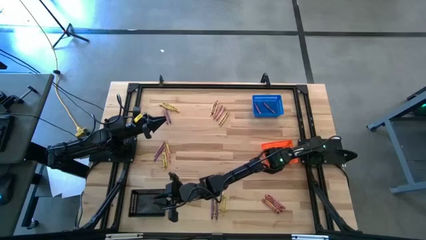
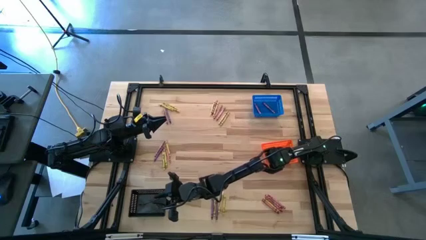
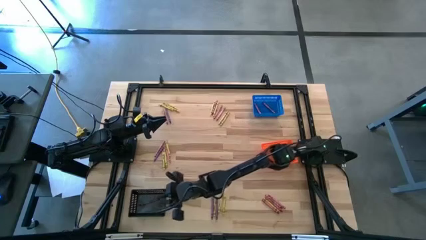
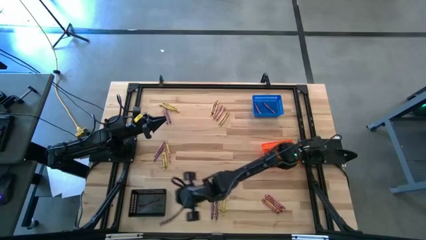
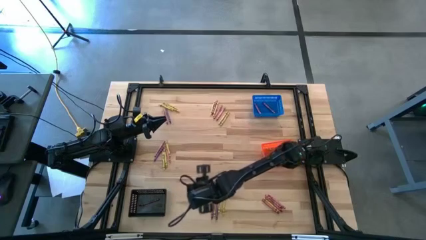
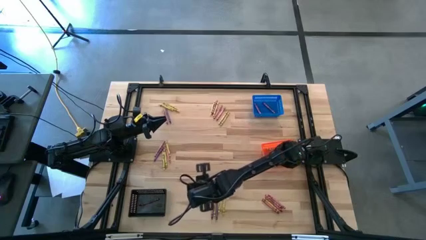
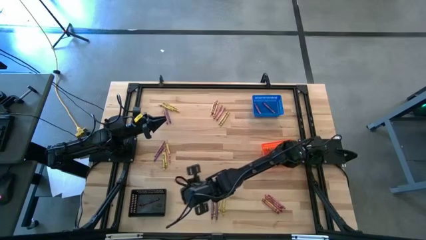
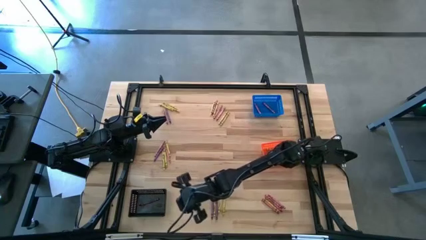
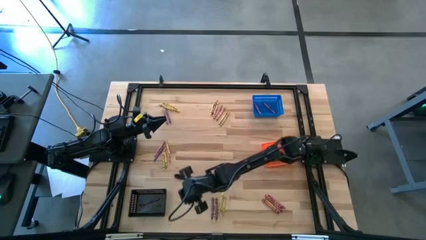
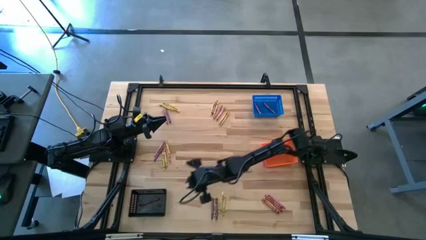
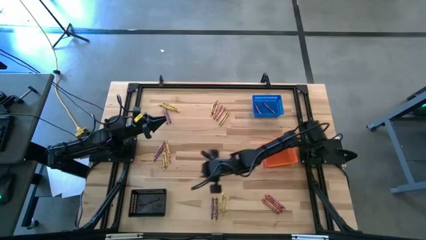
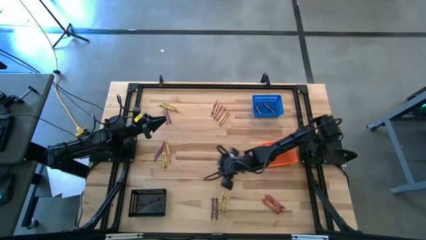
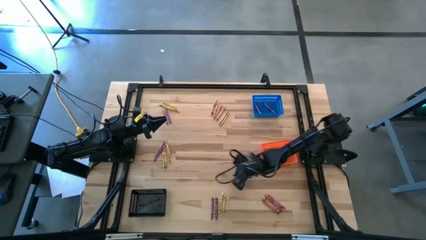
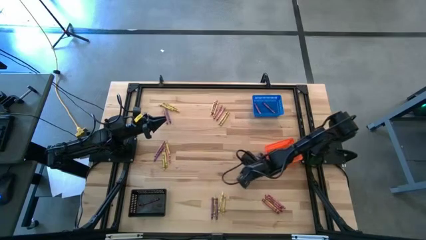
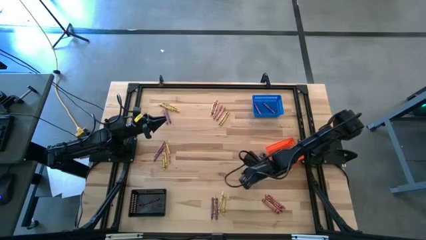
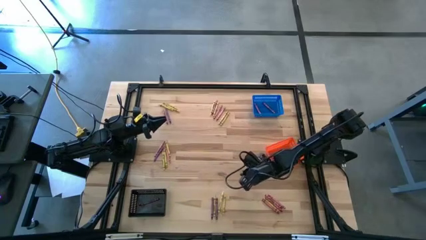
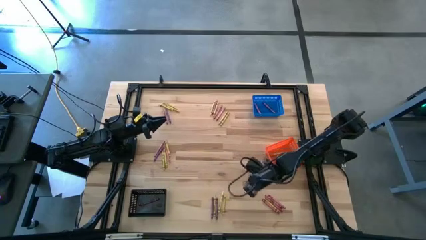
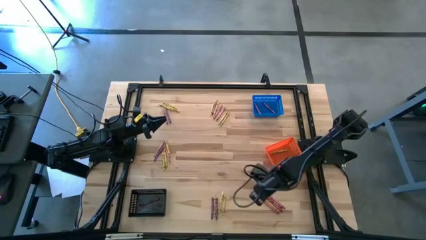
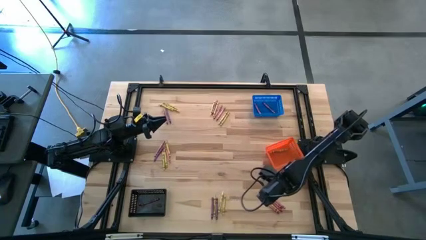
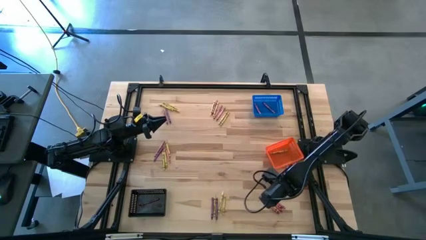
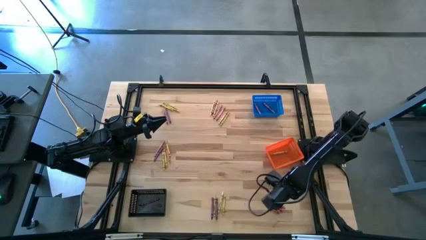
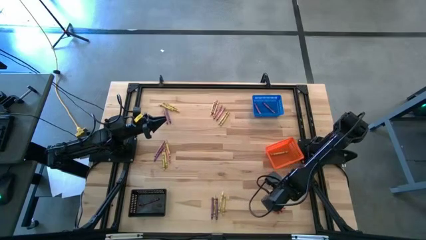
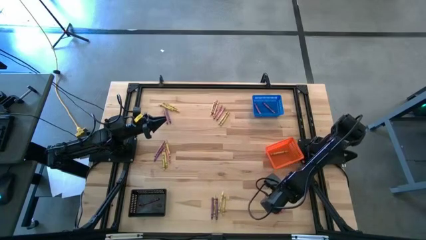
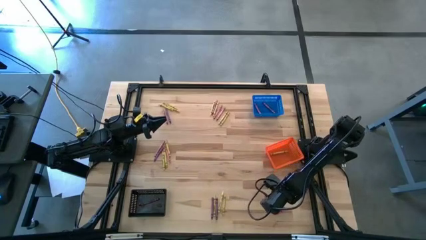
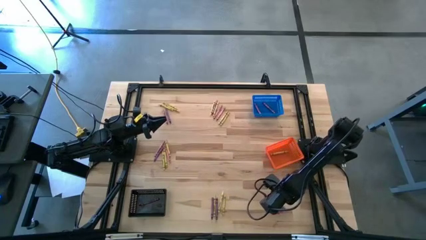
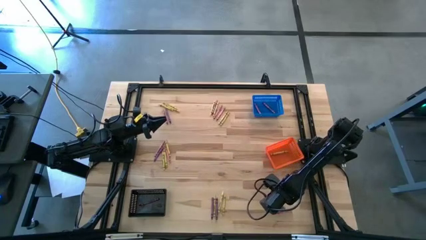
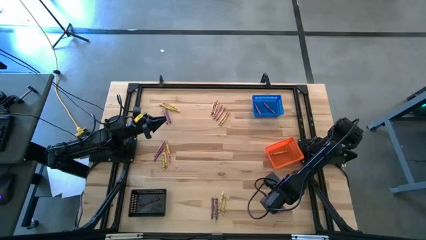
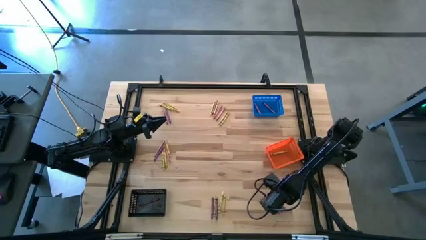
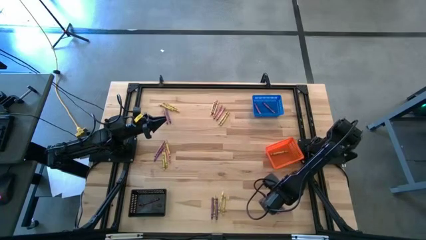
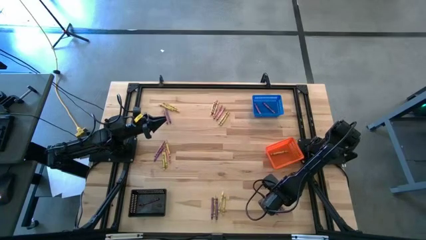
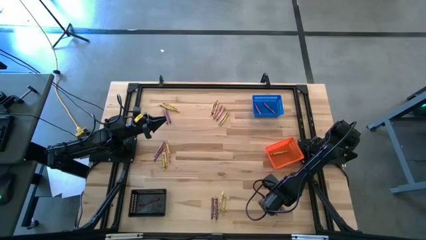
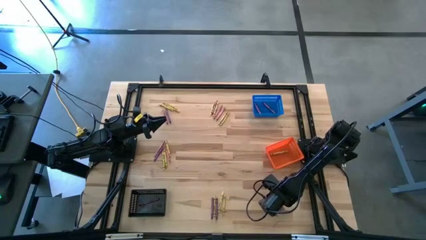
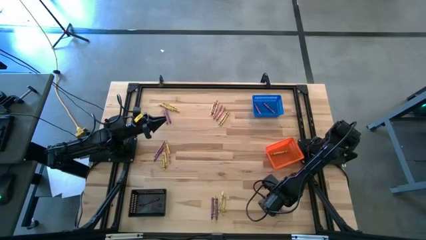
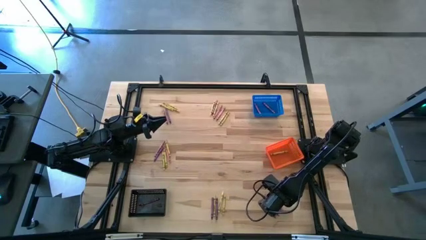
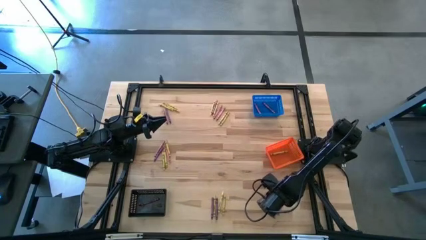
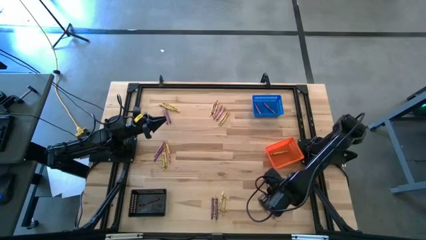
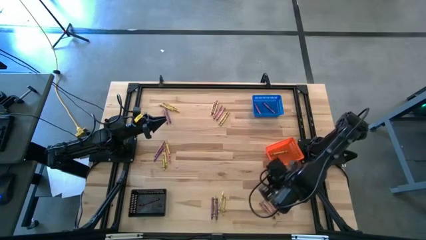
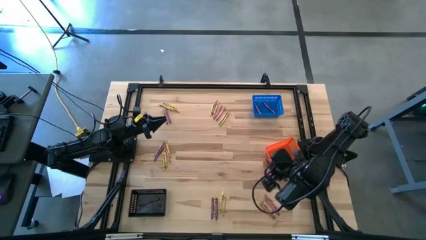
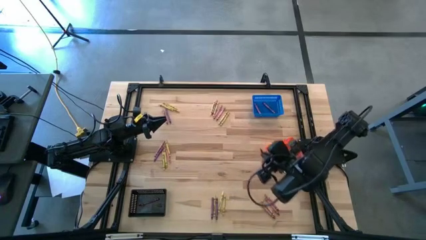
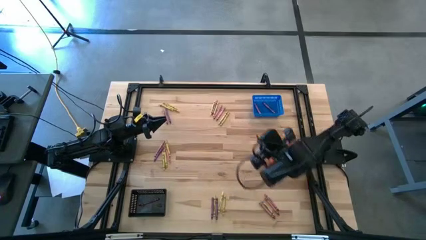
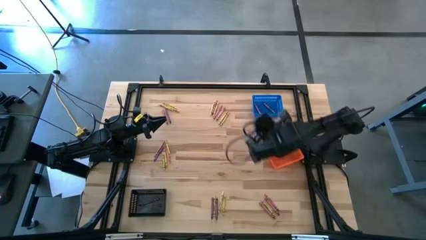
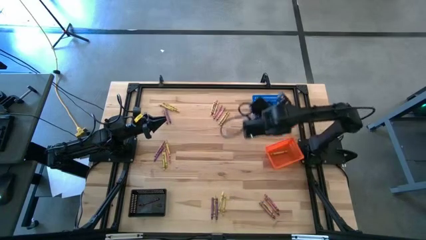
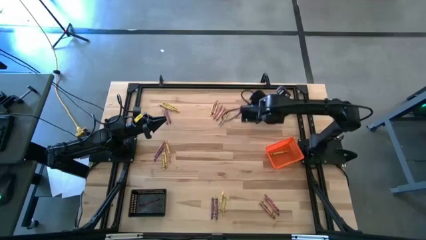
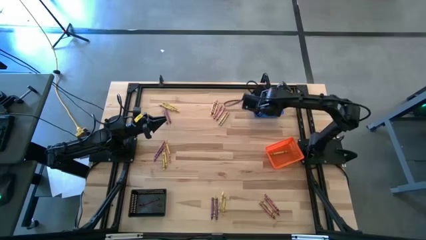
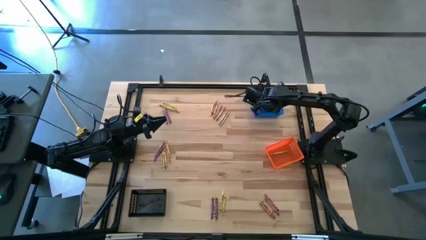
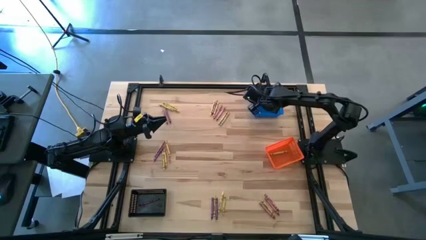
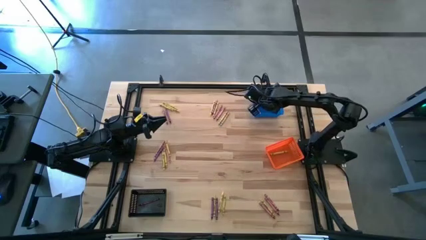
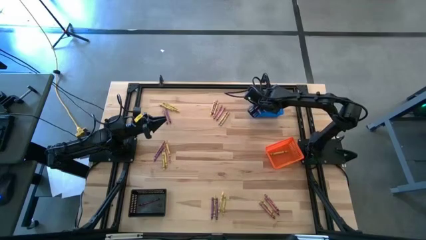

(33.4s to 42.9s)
Task: Sort crayons
Put the red crayon into the blue basket

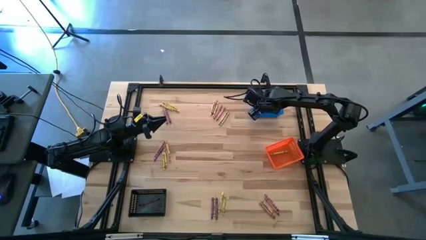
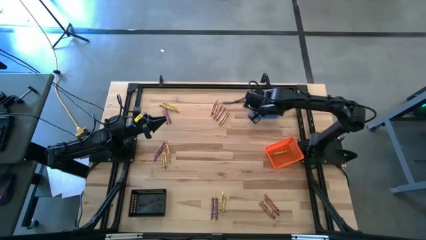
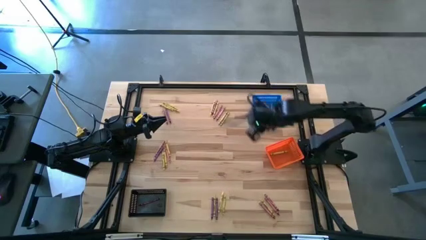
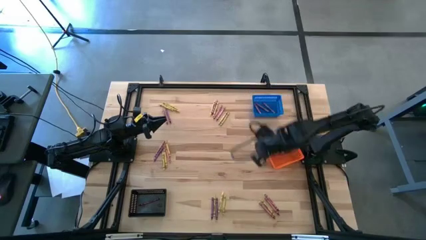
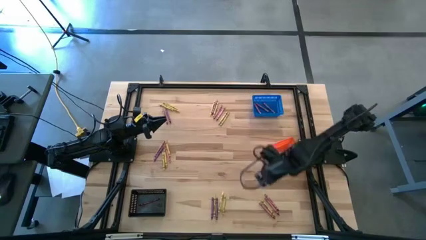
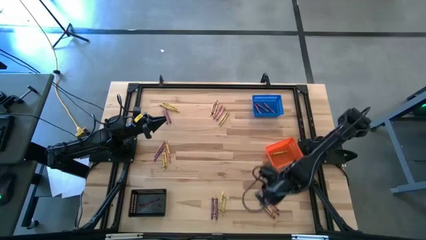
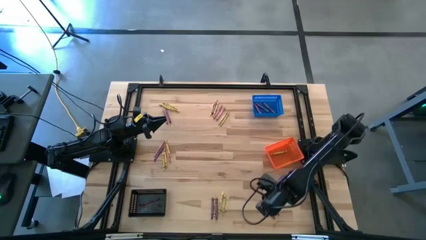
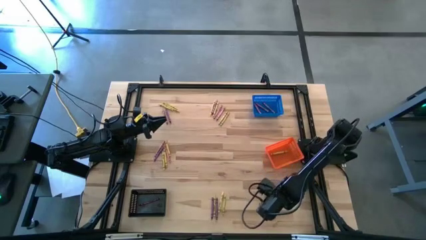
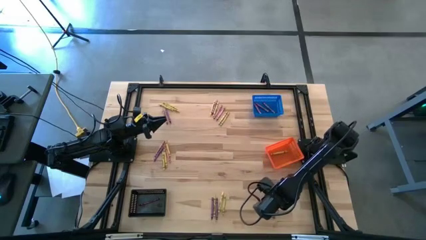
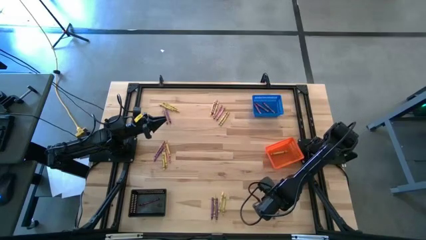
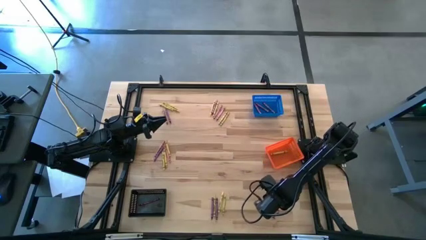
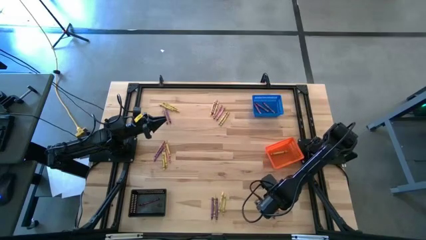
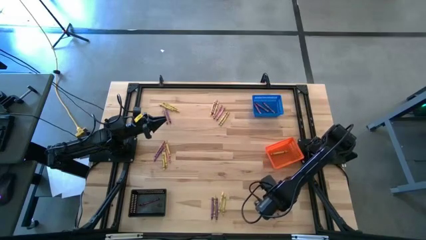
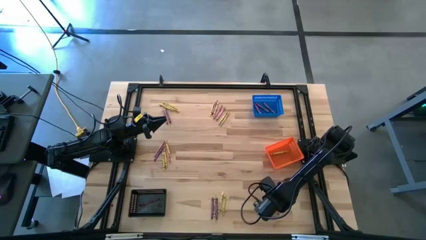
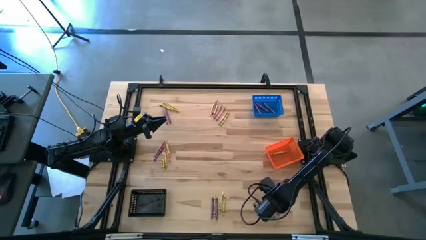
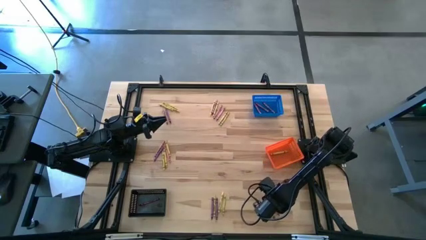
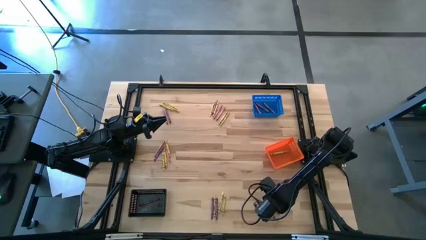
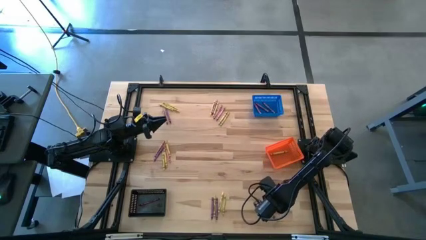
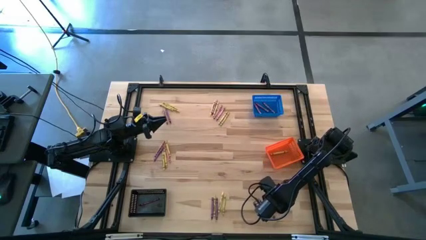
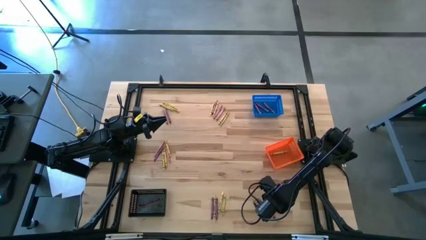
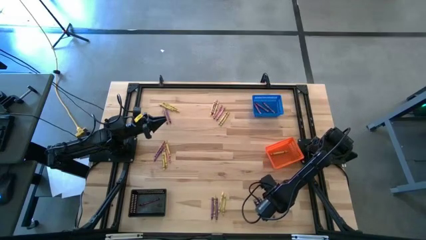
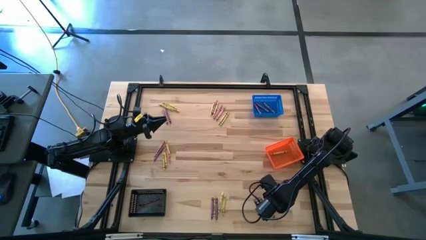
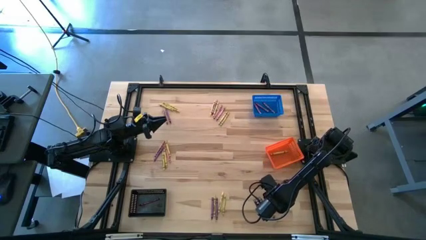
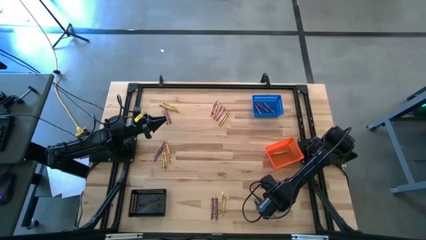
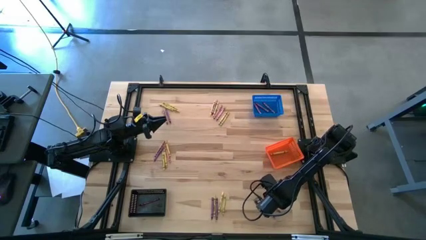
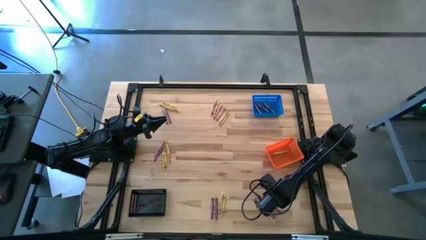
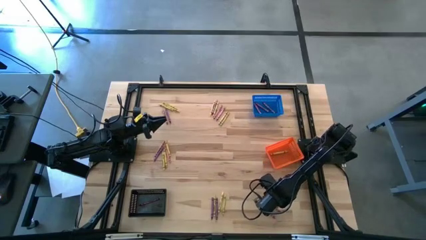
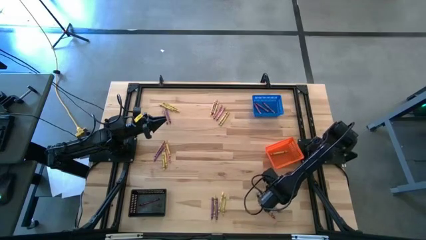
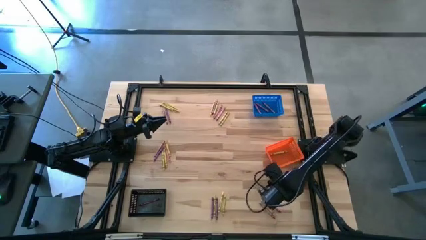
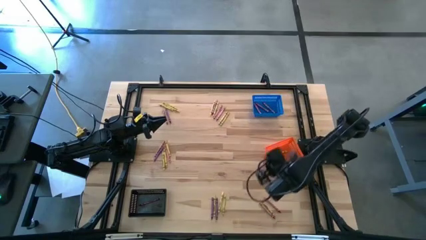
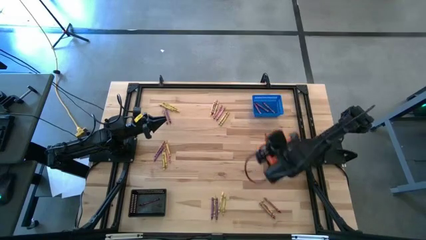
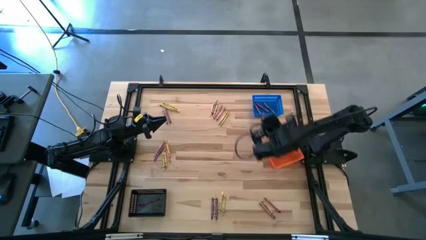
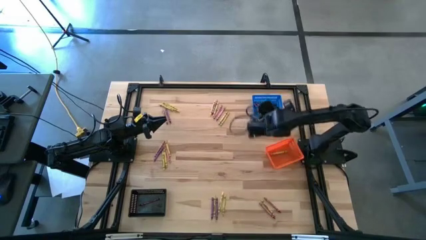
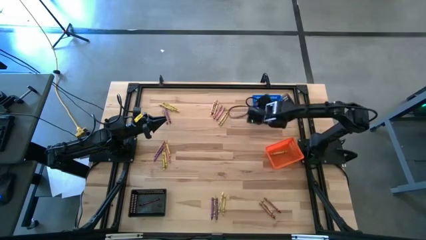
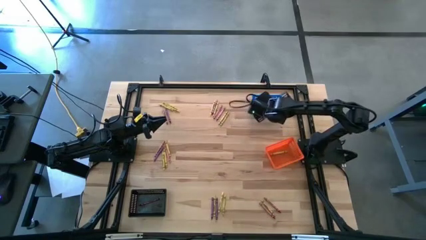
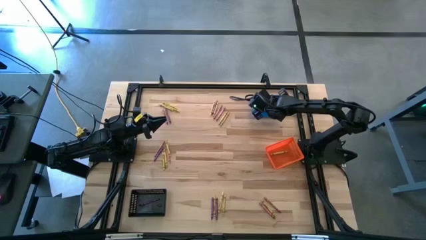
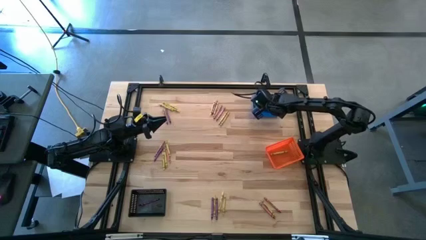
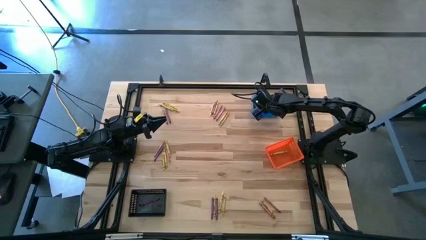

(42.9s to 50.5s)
Put the red crayon into the blue basket
